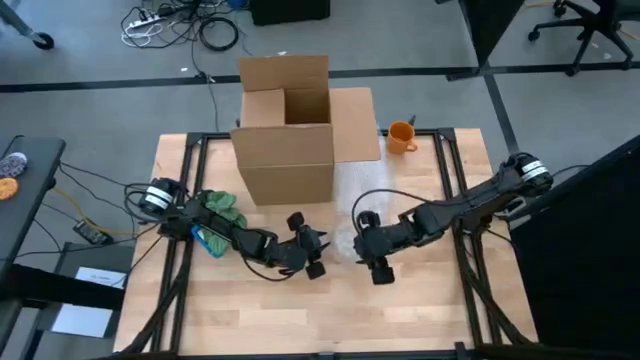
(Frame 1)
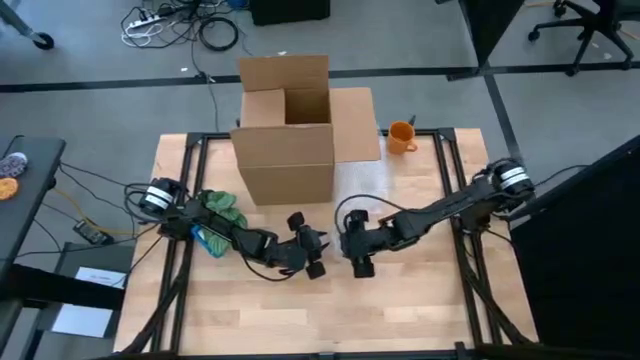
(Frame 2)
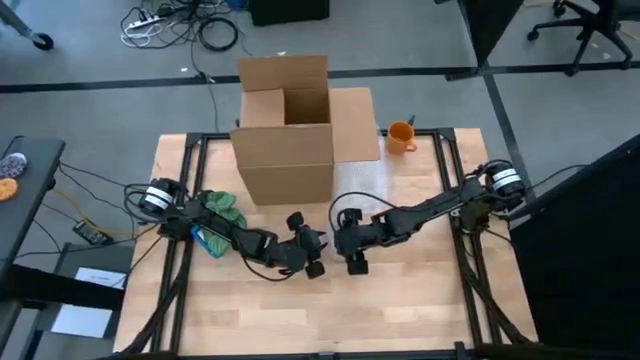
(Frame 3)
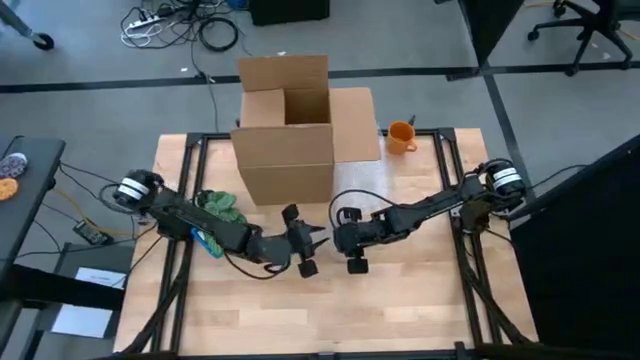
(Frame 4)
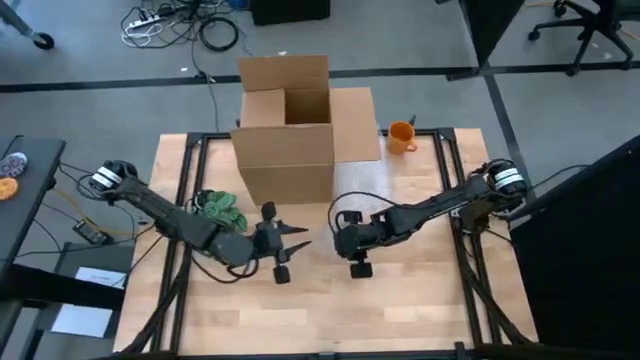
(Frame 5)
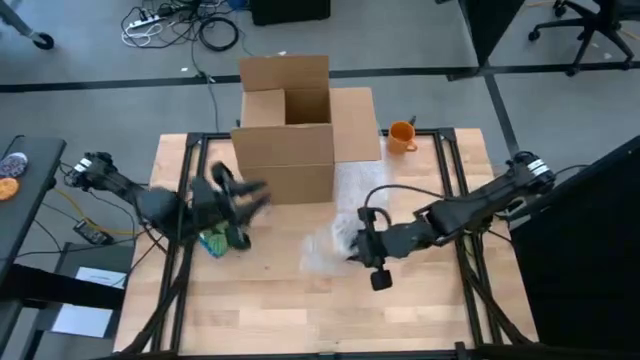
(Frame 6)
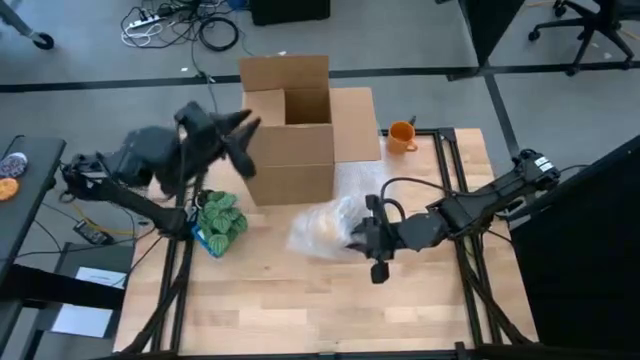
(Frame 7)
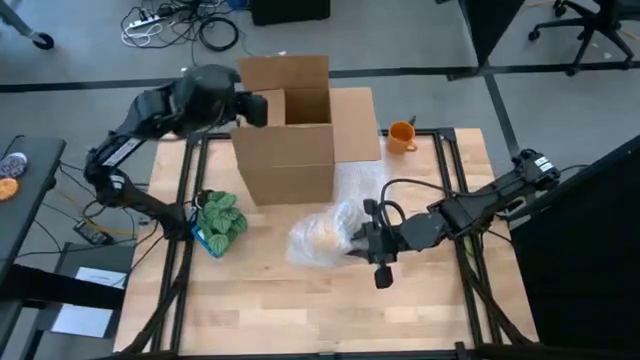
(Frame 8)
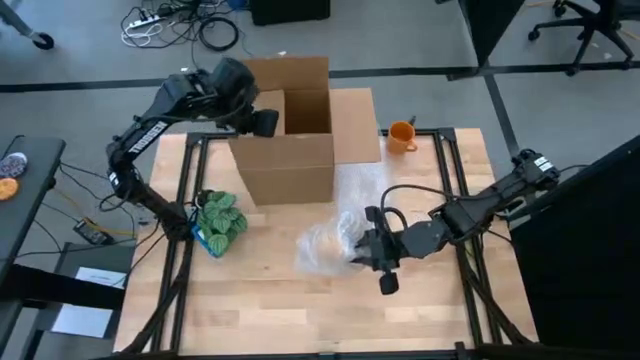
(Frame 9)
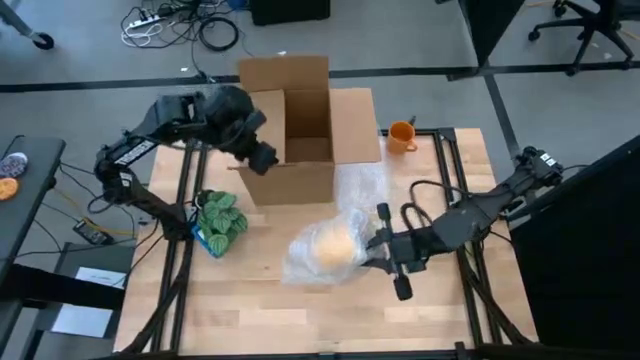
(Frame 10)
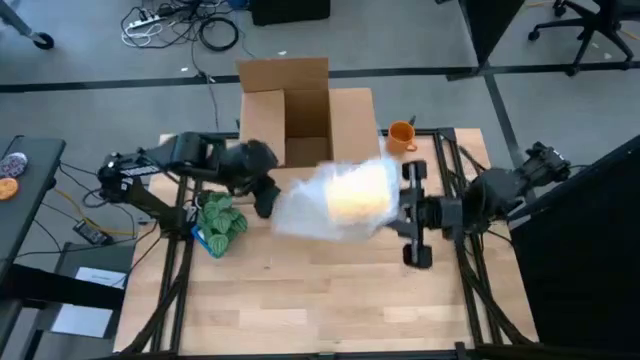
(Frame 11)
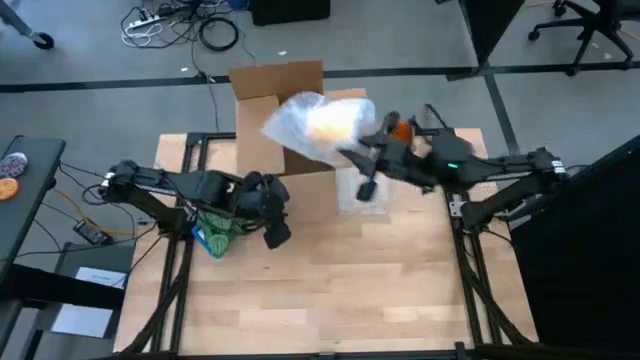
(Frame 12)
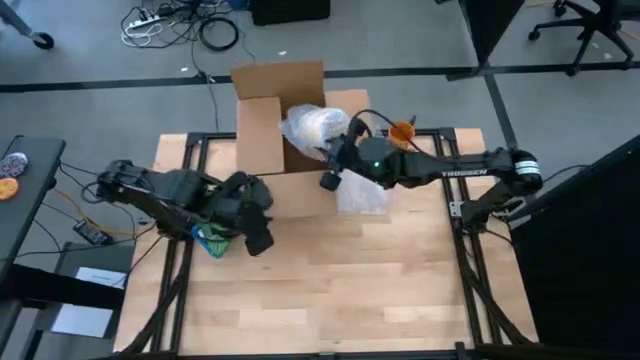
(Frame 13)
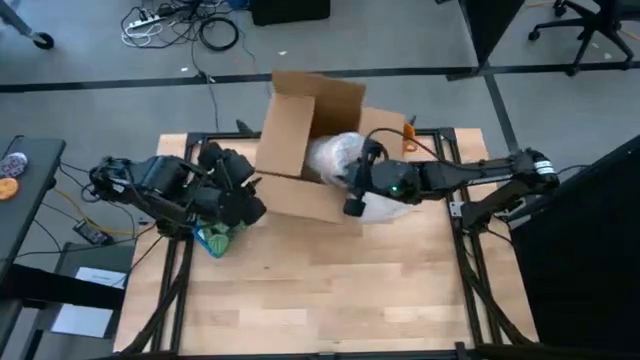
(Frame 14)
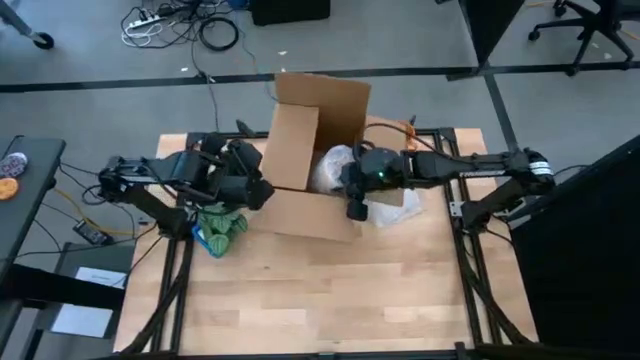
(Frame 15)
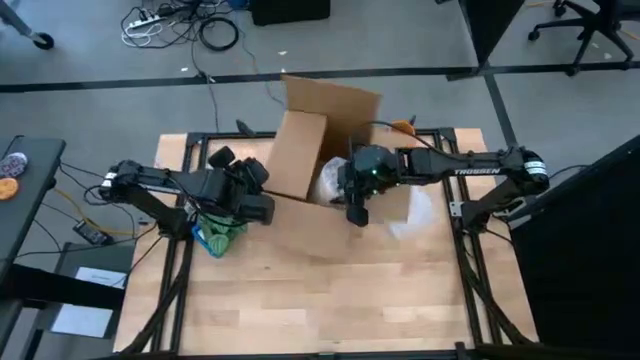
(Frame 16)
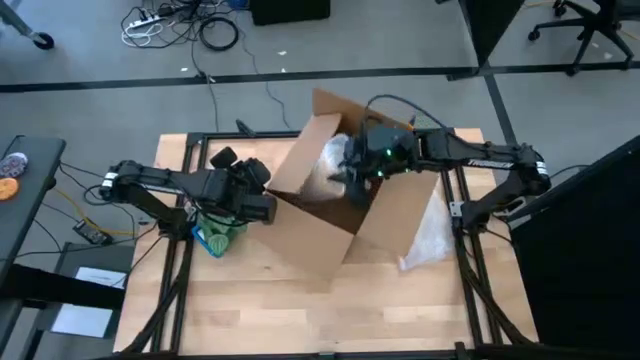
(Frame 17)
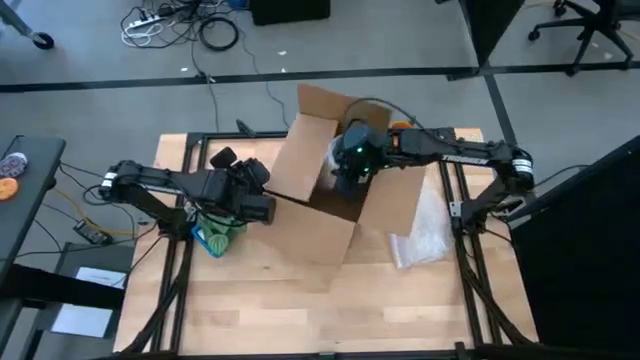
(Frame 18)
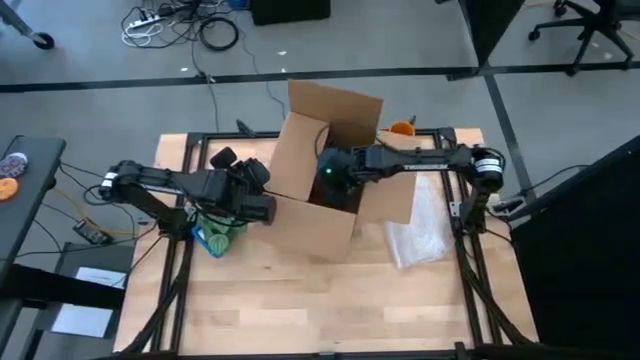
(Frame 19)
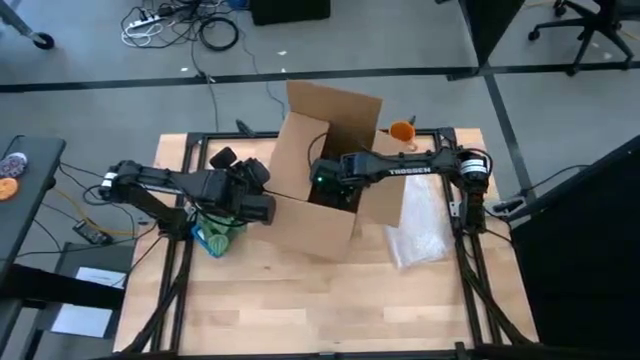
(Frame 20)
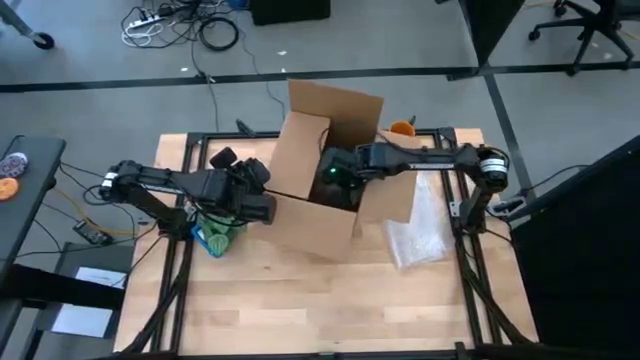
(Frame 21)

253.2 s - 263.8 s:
Task: wrap mug
Put the wrapped yellow mug into the brown cardboard box

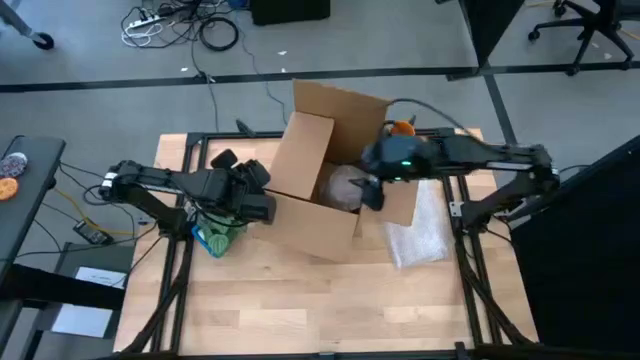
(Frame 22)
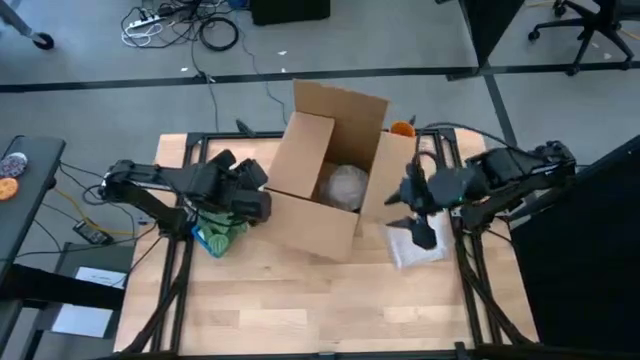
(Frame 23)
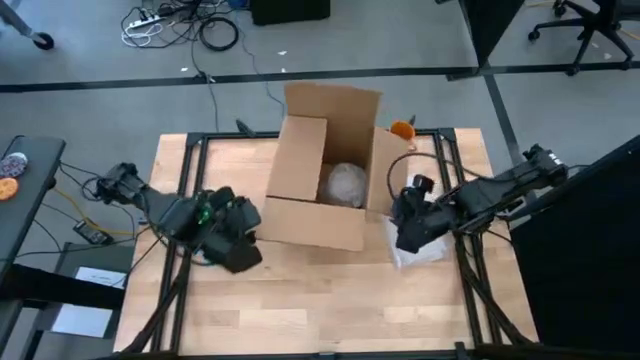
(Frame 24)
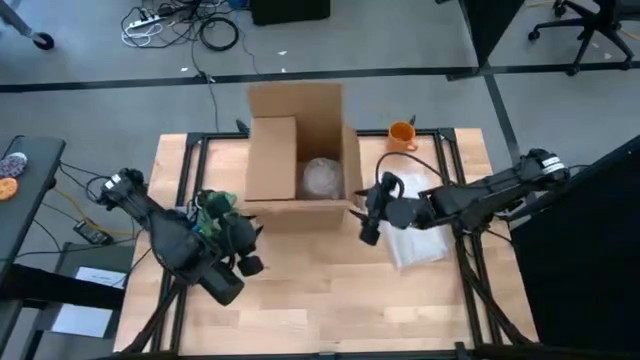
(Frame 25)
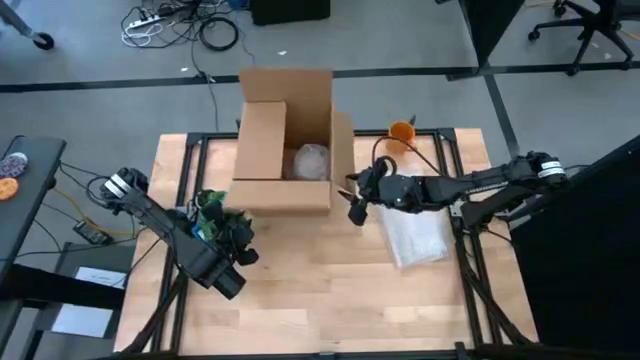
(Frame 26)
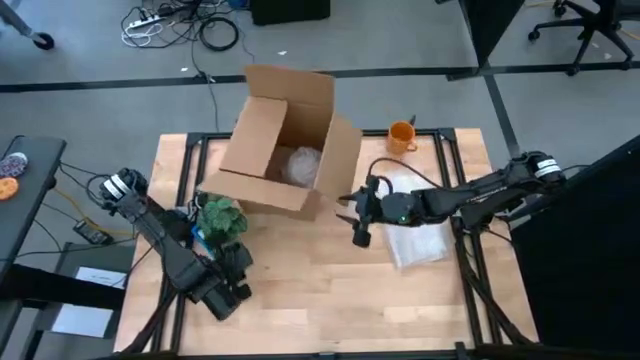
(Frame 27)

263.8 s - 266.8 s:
Adjust the brown cardboard box

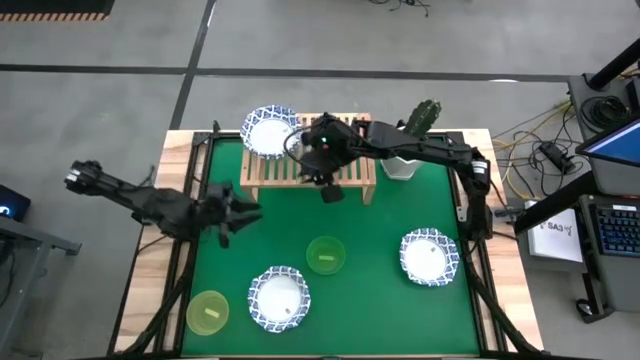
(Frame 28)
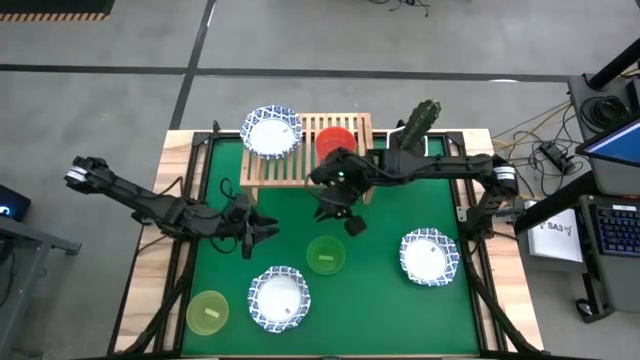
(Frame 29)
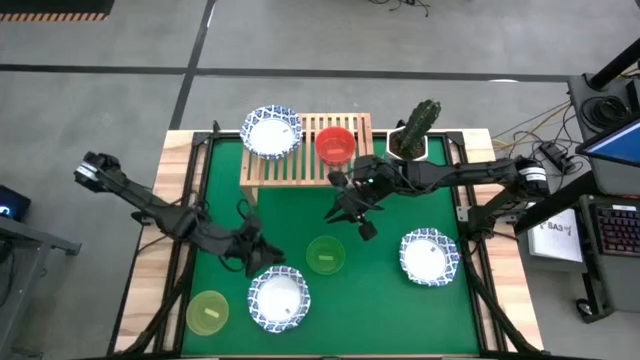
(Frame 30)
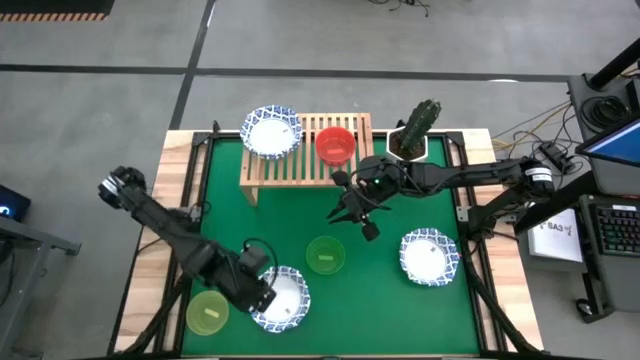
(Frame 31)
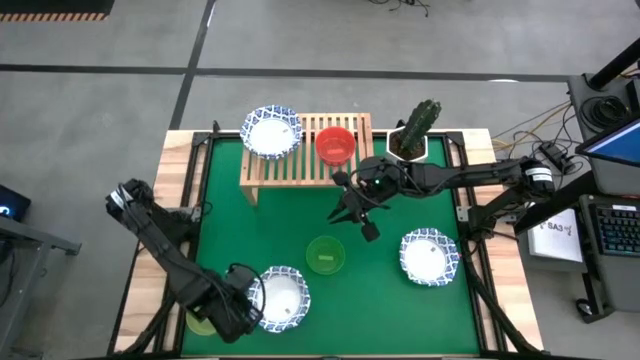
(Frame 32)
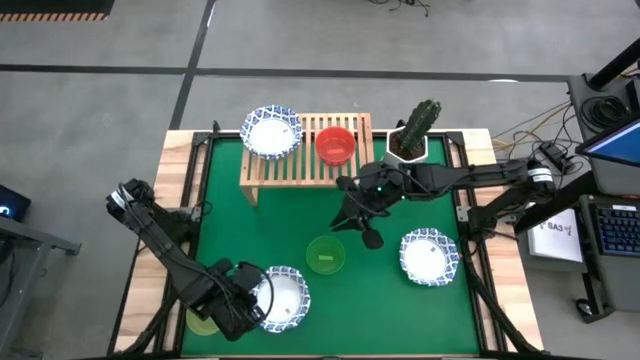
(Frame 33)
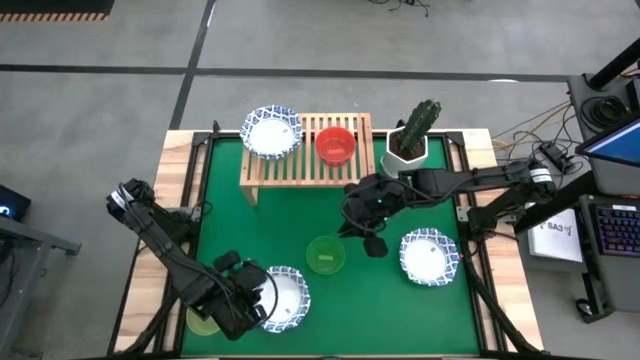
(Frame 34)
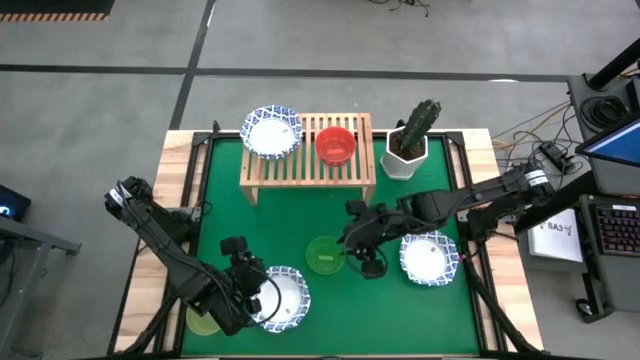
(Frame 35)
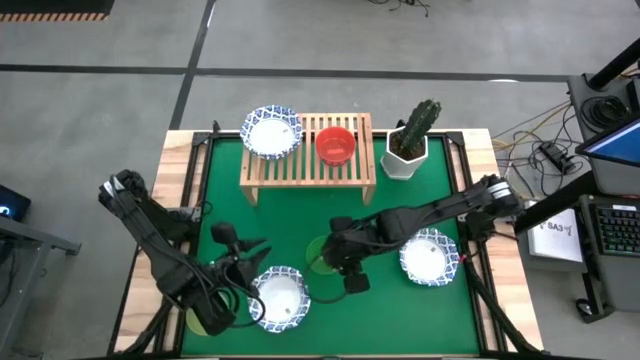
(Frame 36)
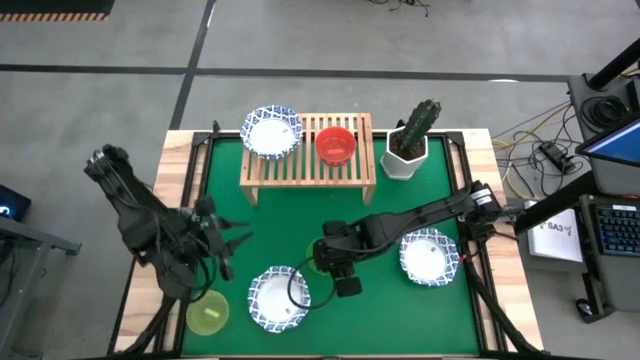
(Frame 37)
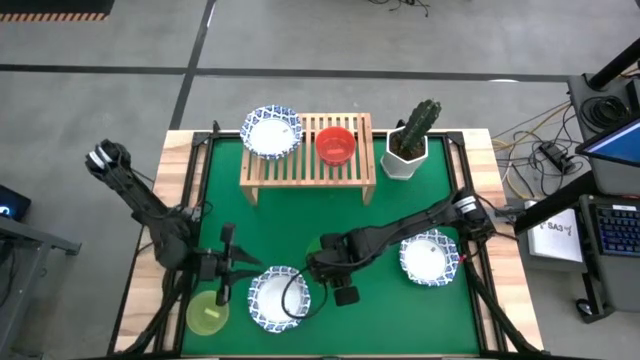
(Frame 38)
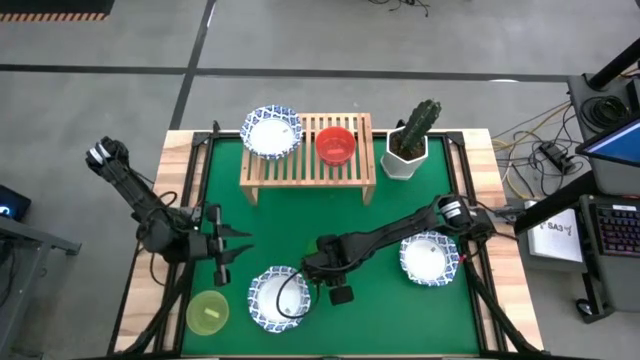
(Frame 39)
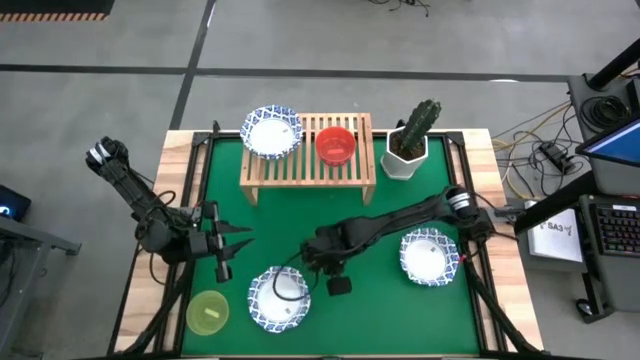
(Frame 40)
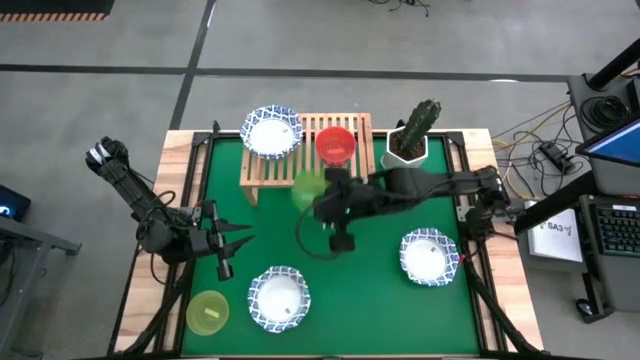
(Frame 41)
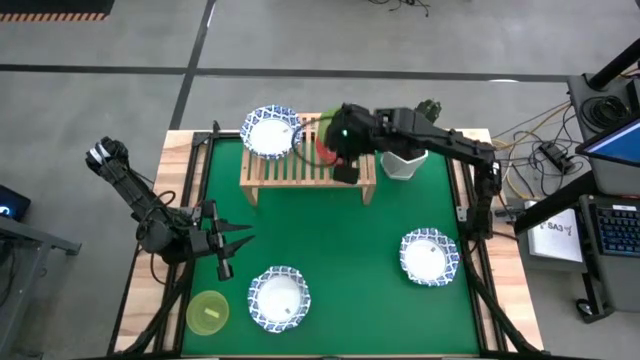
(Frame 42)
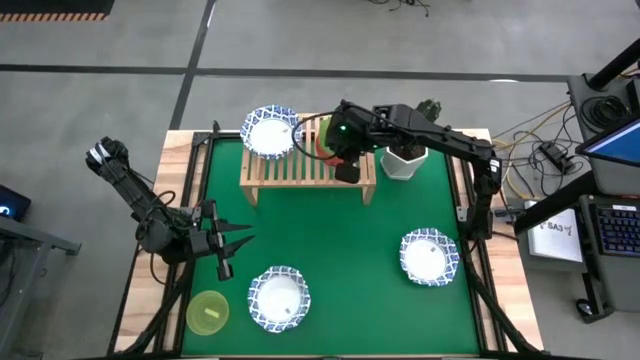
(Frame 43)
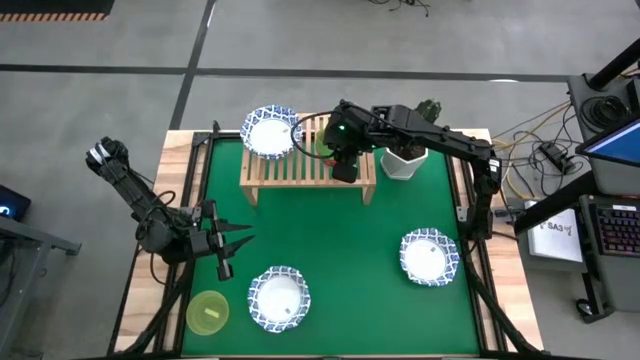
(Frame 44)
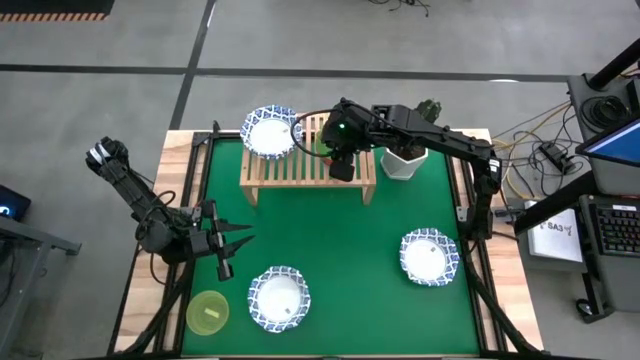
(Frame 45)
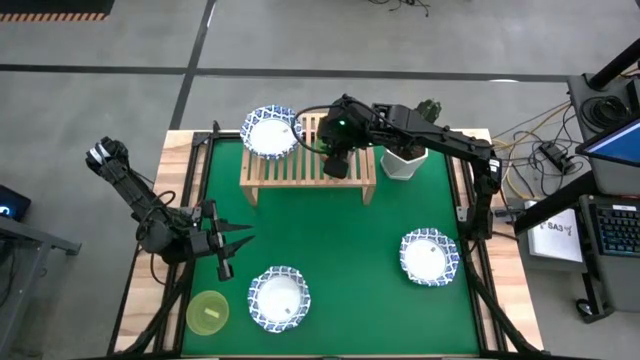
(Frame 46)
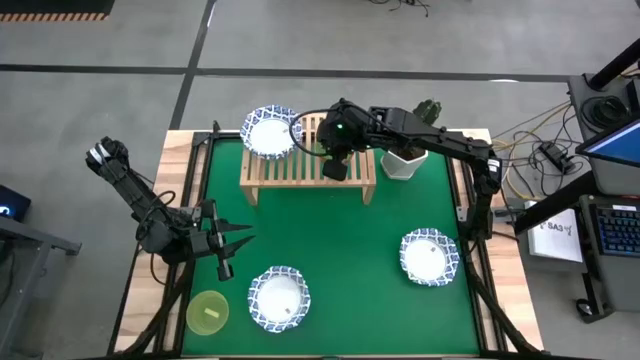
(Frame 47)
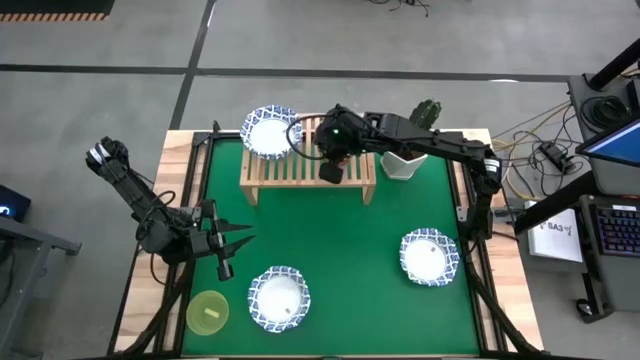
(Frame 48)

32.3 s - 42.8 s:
Task: Place and stack bowls onto a shelf
Stack the small green bowl on top of the small orange bowl on the shelf
